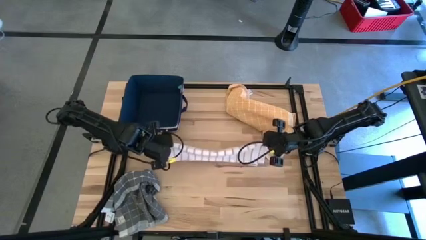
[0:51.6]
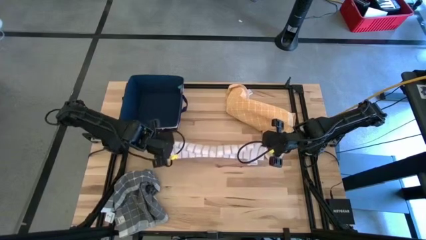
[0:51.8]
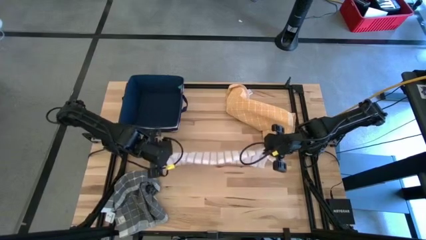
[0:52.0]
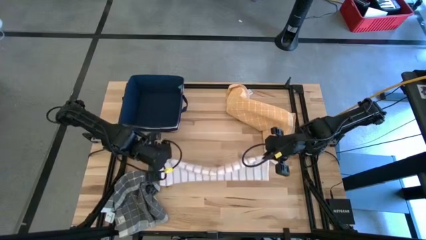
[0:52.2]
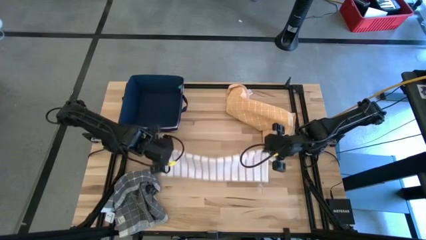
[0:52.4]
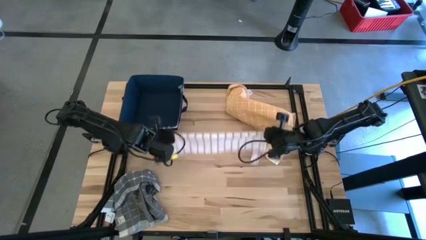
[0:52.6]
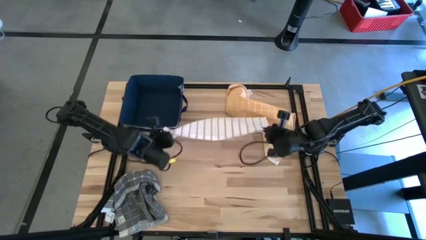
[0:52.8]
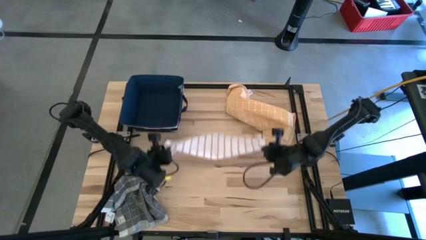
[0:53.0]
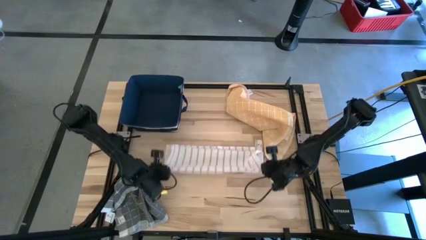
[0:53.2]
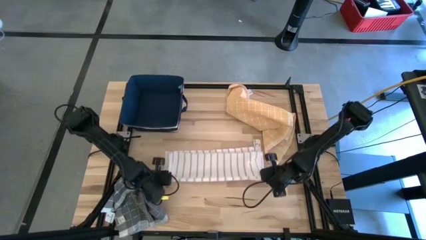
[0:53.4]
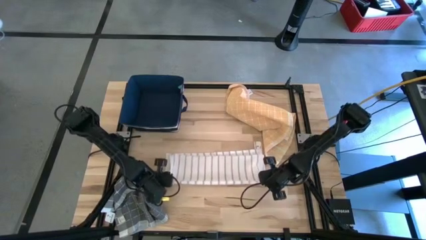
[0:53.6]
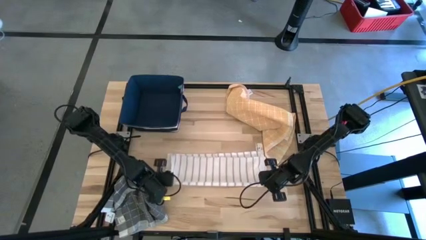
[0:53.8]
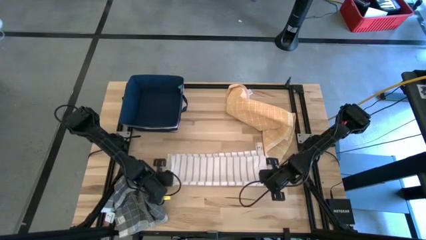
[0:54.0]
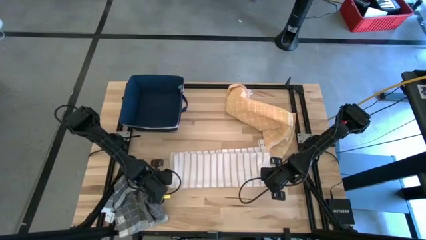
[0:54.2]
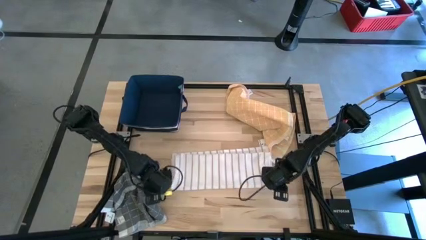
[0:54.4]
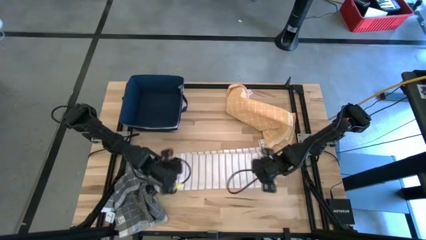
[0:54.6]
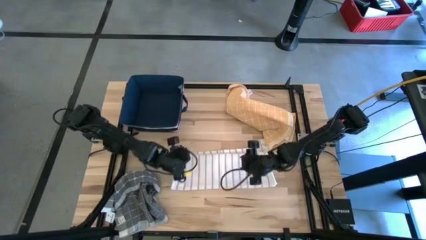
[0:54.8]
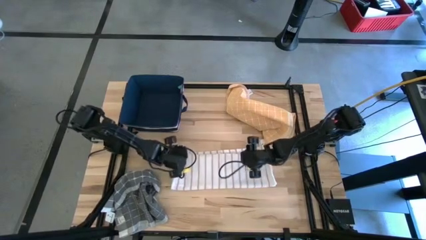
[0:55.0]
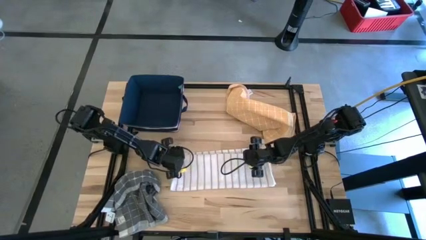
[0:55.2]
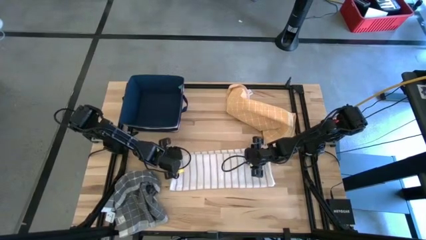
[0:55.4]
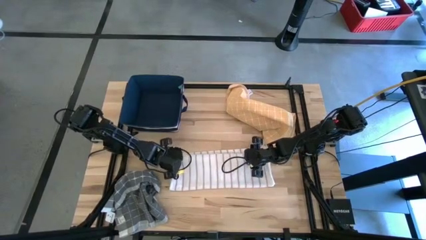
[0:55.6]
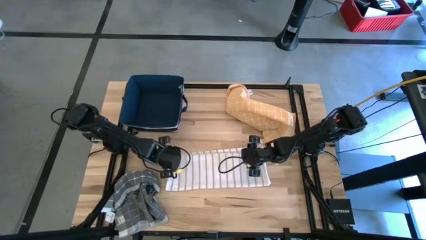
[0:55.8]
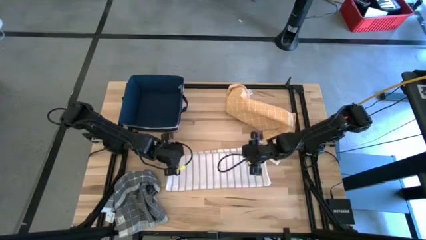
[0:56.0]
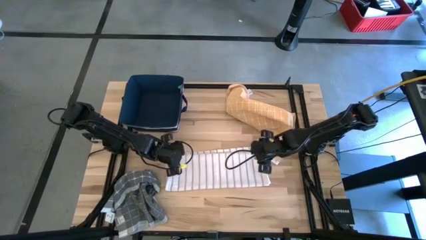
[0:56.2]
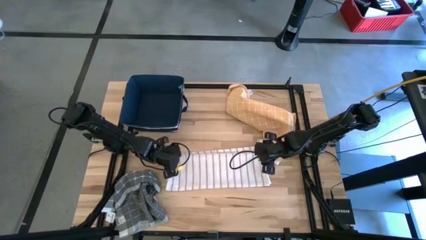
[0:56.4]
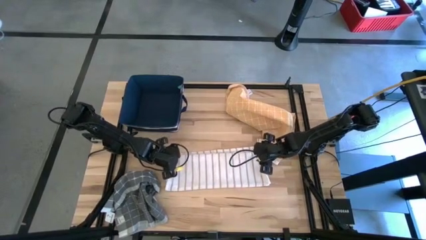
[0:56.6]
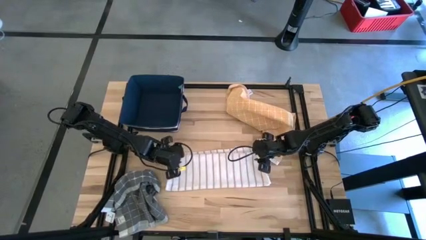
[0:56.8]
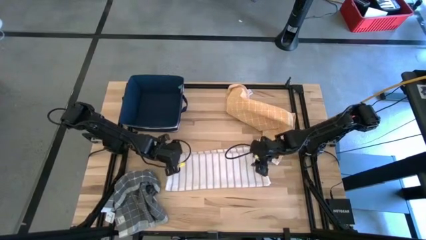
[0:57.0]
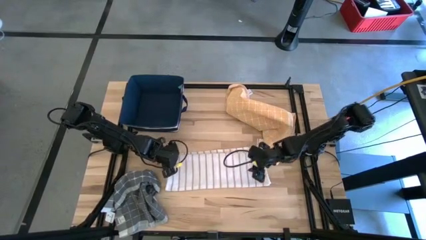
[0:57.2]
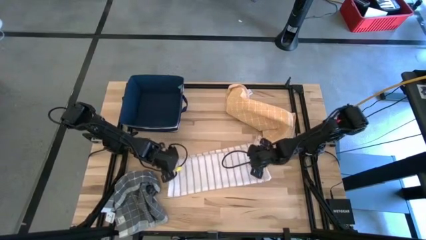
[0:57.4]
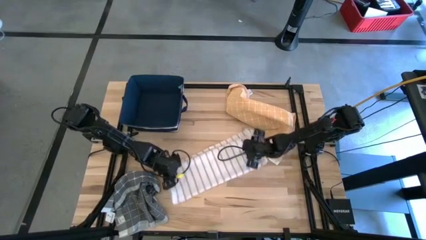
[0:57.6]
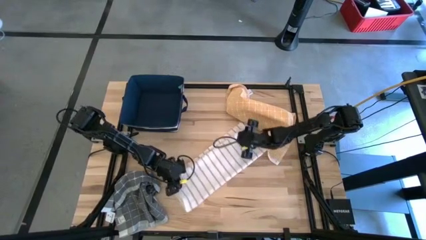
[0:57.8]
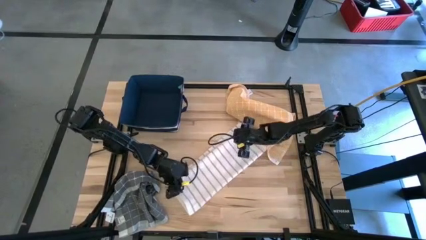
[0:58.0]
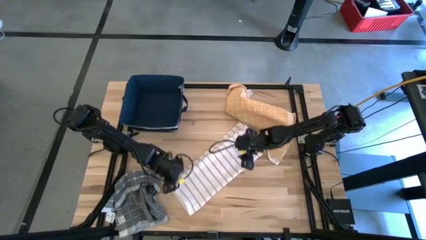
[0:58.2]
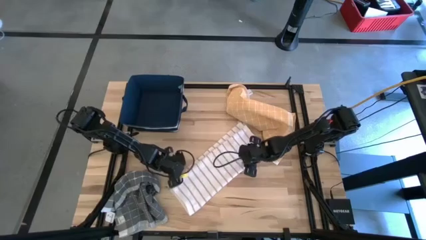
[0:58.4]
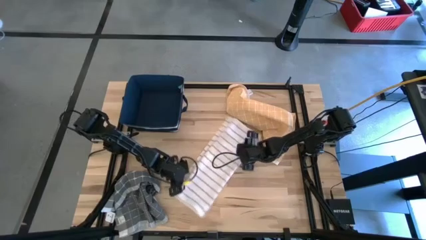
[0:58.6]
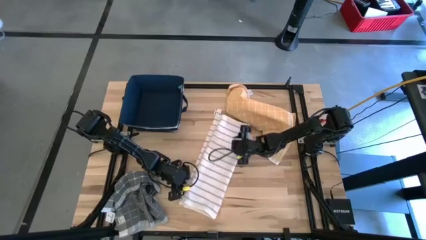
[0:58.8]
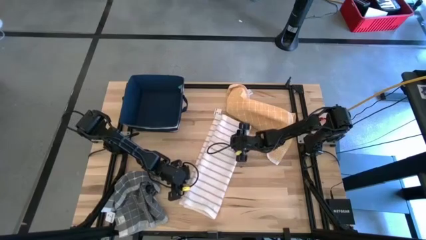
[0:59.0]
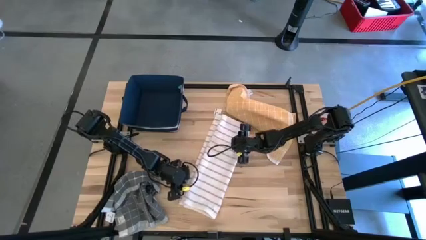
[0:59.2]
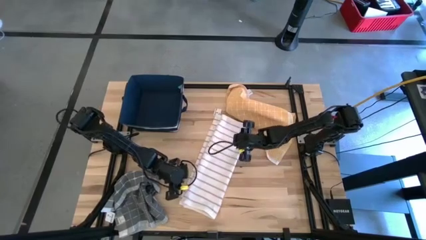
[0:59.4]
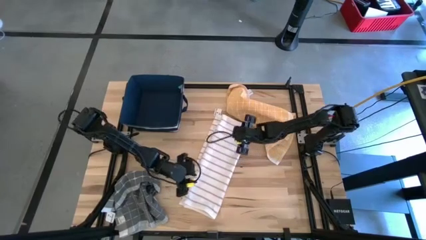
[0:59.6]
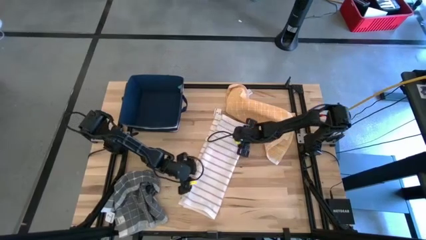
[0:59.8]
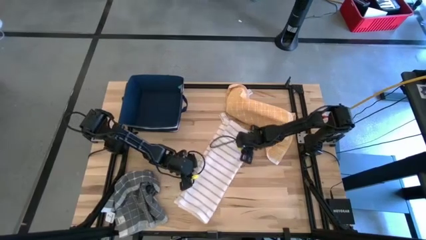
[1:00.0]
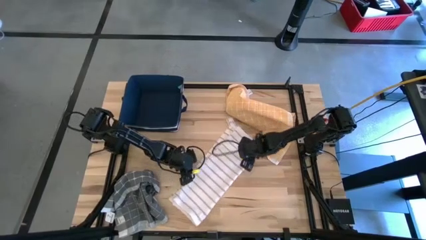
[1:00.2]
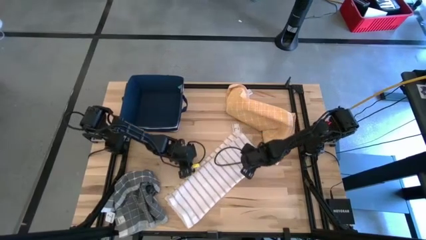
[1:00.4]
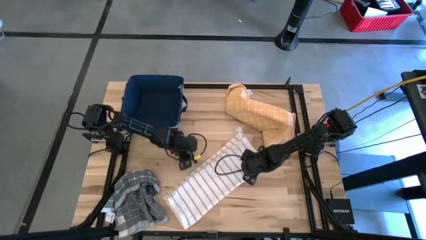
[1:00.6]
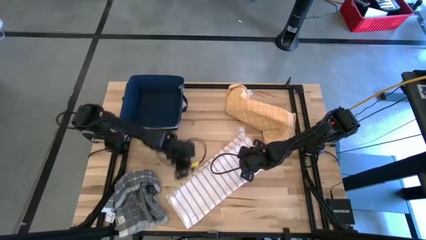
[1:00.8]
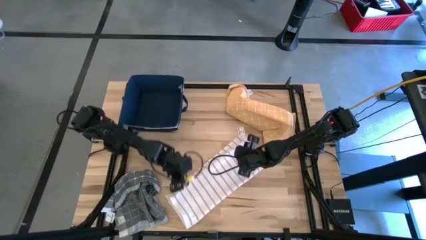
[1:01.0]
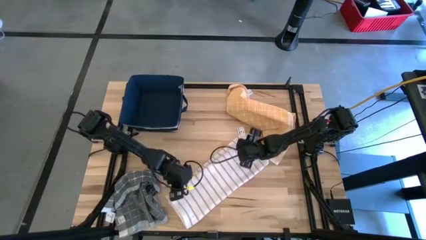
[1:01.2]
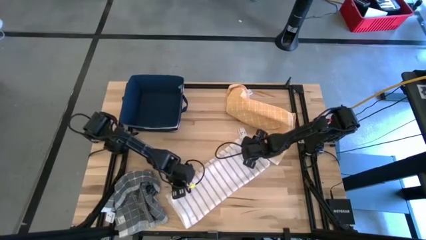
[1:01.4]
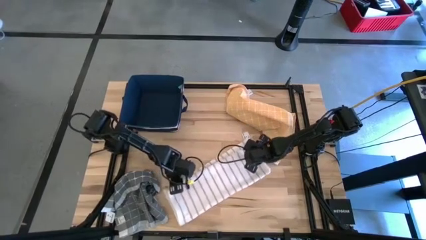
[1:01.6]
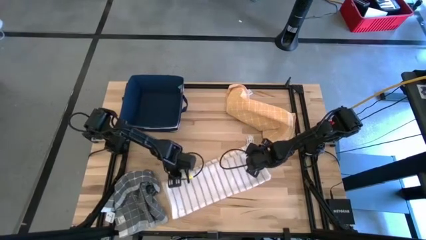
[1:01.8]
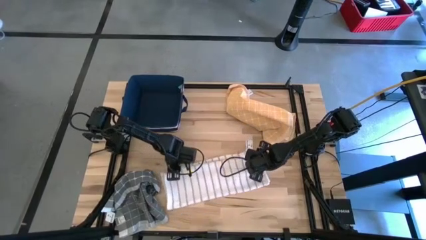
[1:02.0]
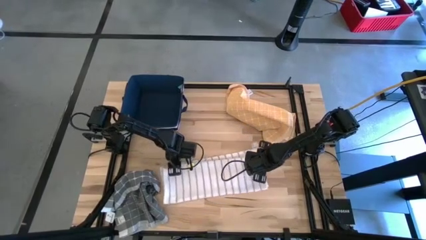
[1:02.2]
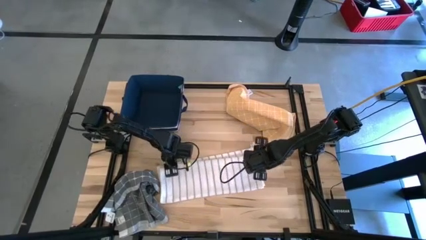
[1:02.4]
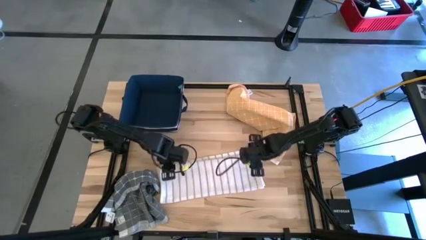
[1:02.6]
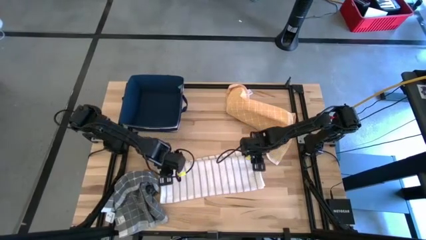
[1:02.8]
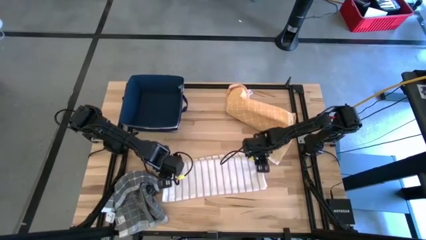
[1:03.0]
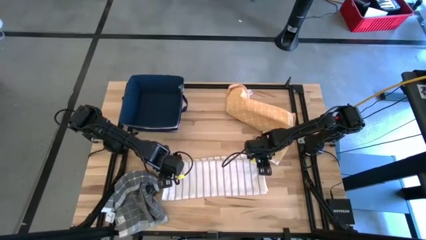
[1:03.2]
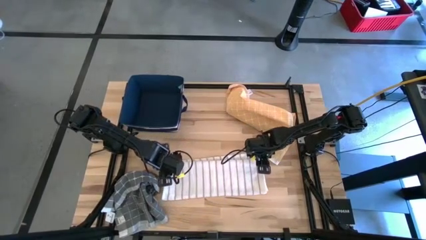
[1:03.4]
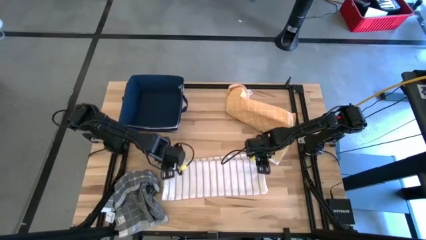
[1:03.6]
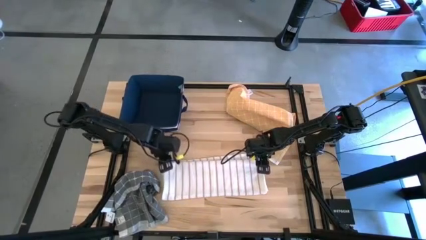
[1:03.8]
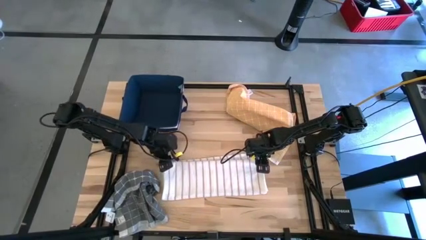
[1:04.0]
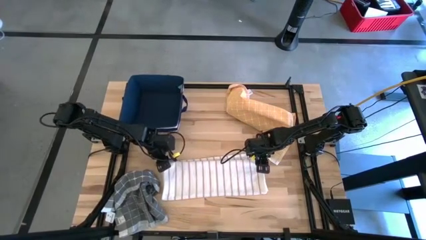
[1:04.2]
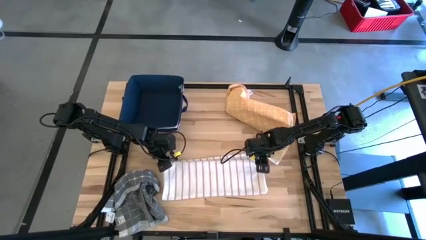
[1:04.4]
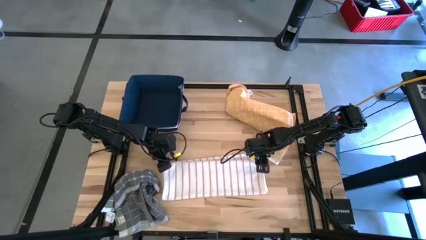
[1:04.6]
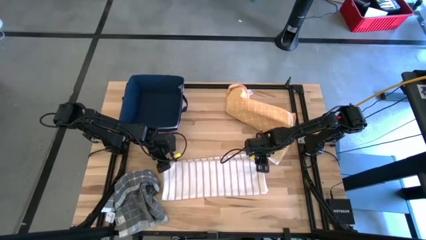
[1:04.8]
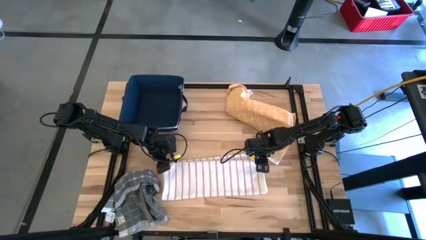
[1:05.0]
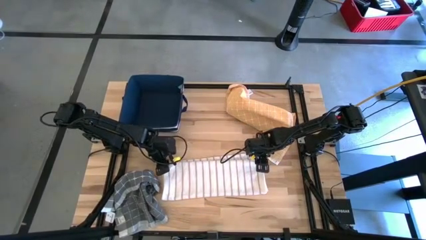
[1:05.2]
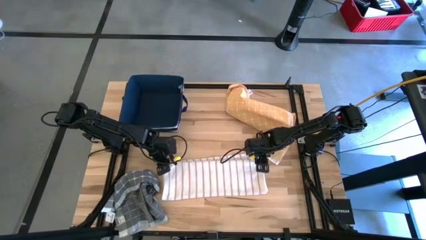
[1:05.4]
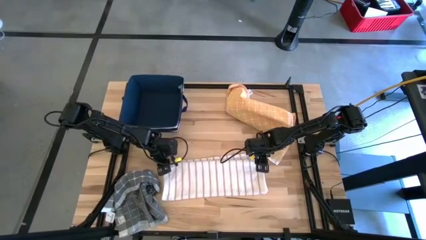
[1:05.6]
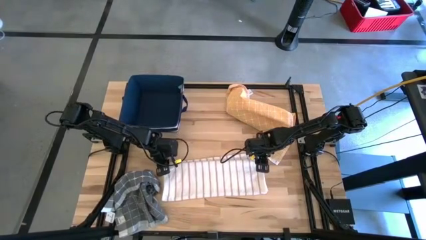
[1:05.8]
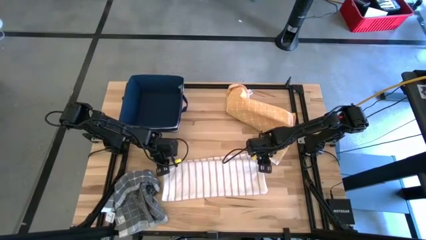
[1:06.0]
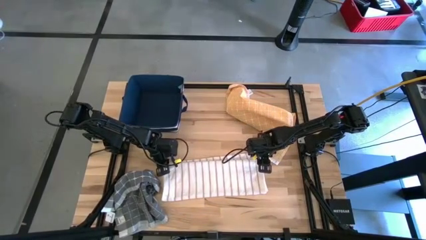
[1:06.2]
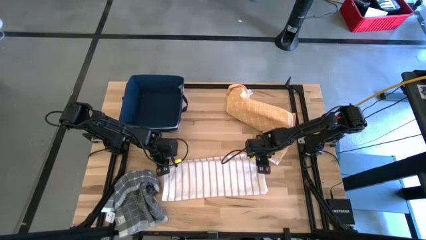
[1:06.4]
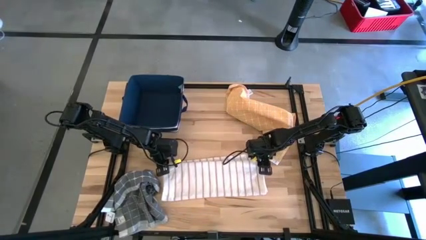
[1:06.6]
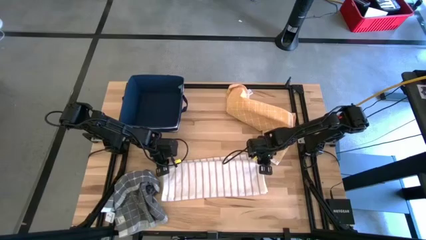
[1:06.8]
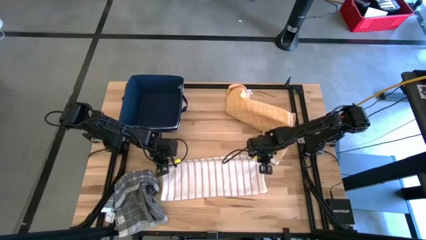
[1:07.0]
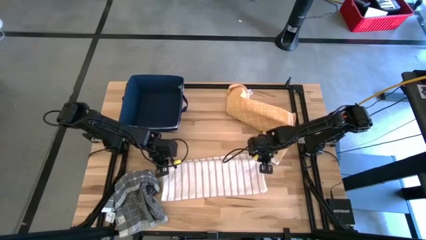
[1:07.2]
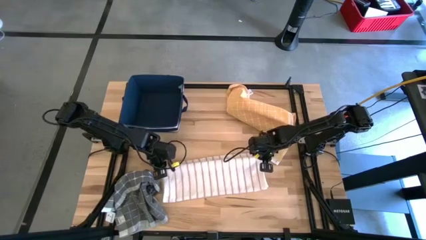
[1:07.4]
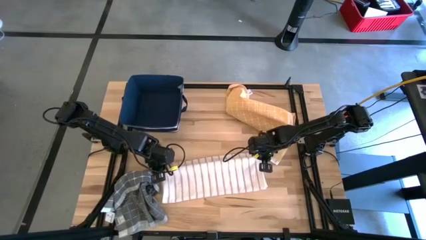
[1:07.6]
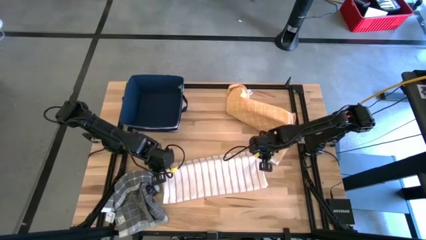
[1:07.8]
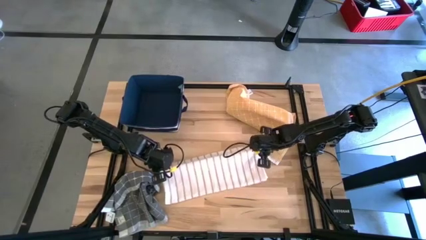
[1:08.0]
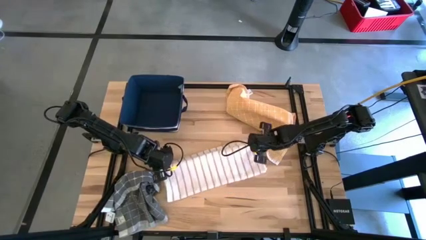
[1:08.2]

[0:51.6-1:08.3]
Task: Fold towel
Fold the white towel

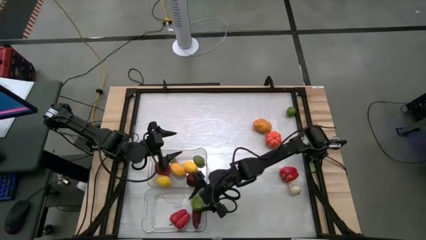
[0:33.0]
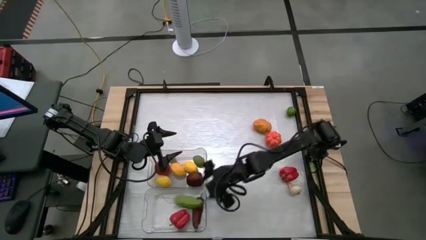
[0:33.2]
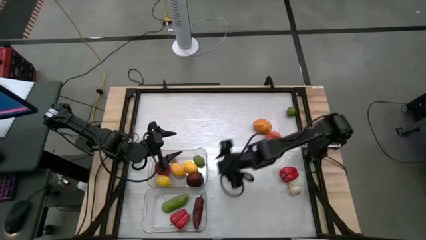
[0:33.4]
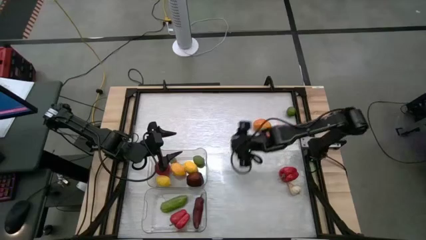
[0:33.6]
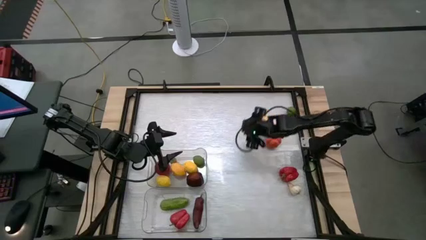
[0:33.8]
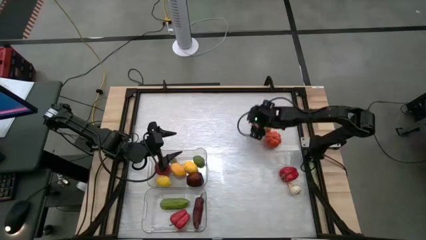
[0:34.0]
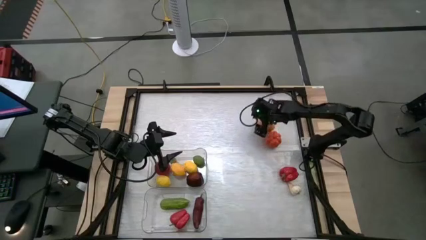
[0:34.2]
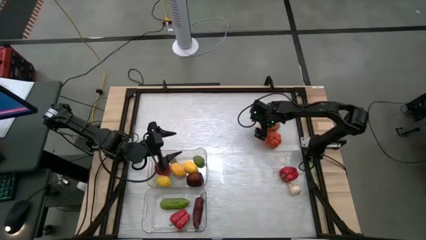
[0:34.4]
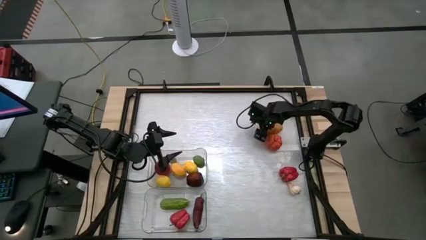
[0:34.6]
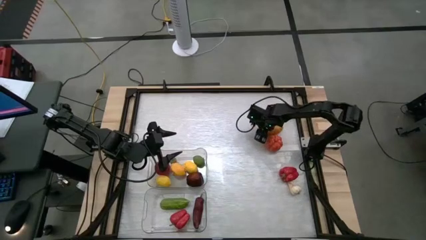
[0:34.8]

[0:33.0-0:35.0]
Task: Sort produce into baskets
Put the orange pumpkin into the bottom transparent bin
